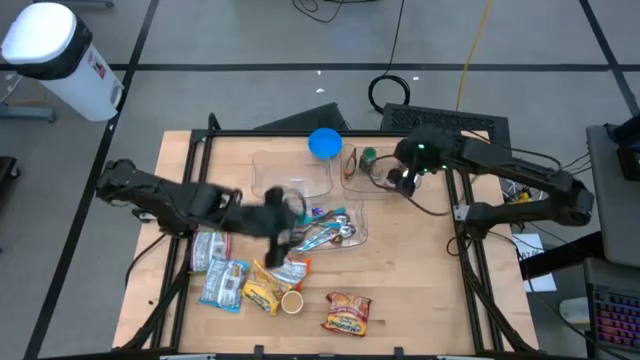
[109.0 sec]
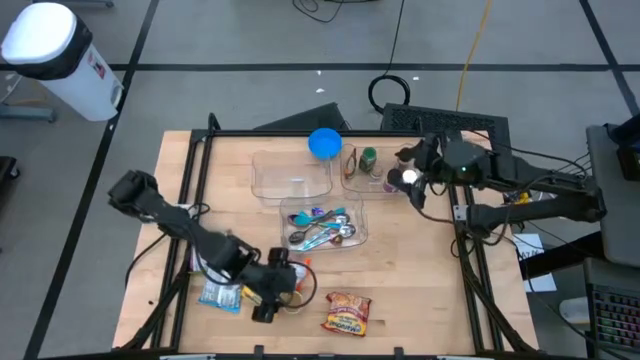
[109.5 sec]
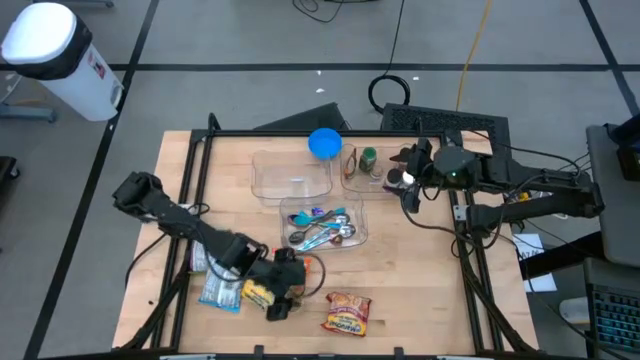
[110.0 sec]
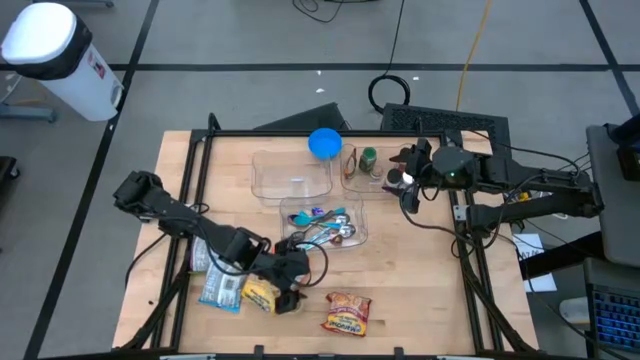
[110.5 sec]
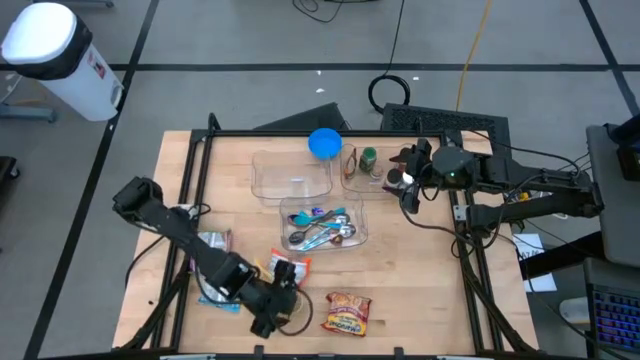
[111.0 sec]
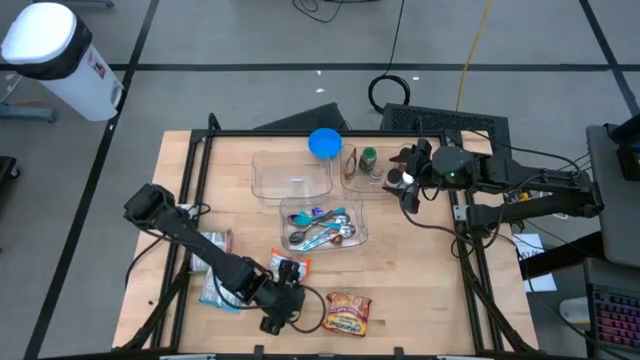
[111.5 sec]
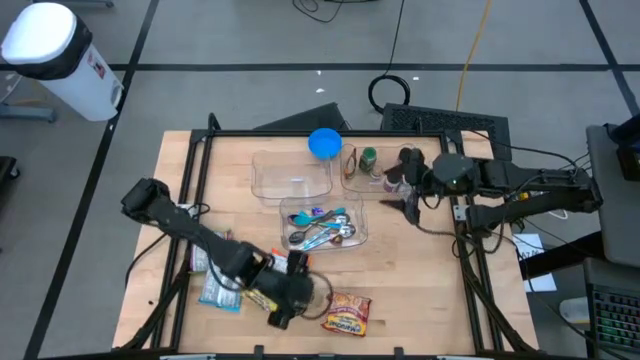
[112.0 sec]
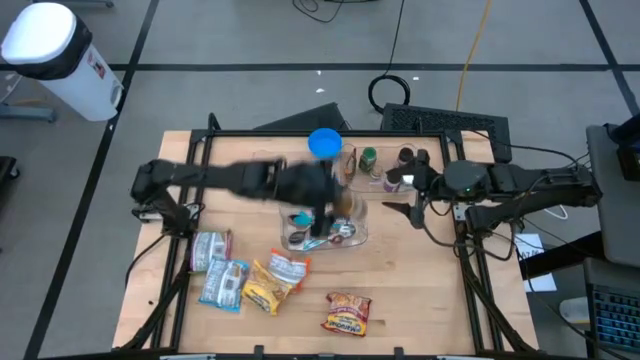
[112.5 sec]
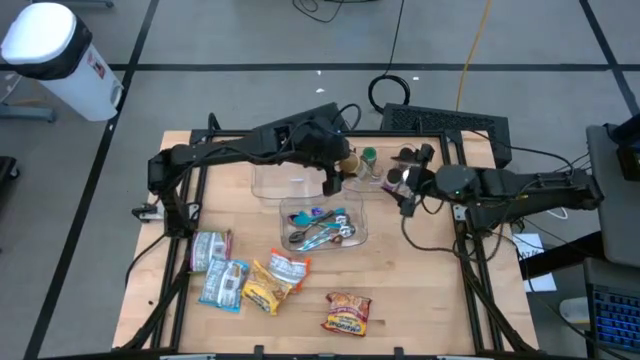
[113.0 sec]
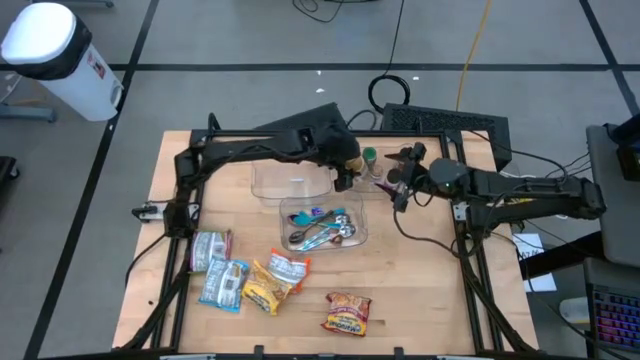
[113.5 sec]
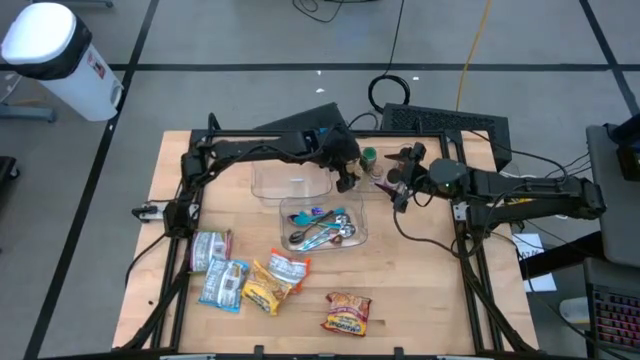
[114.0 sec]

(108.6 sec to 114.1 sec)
Task: Pick & Place Food Item
Put the gold seasoning bottle into the top right transparent bin

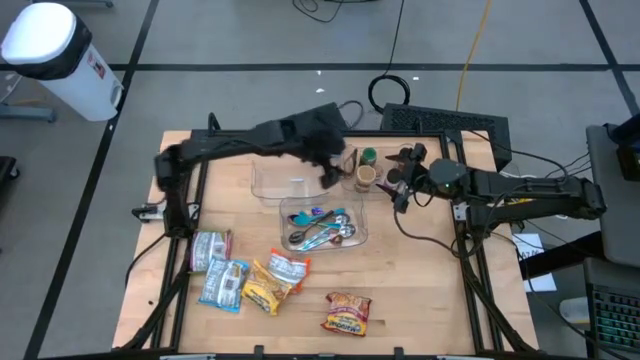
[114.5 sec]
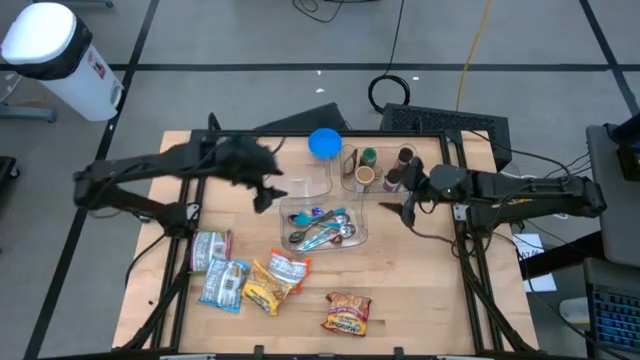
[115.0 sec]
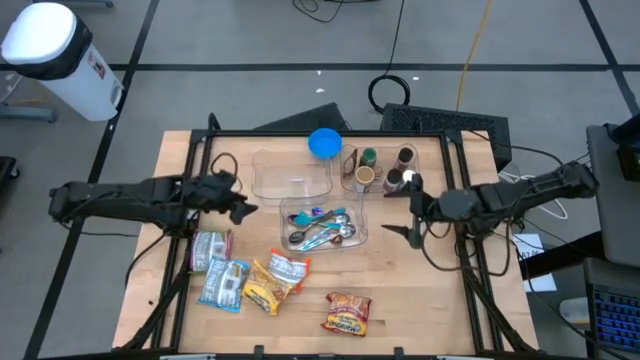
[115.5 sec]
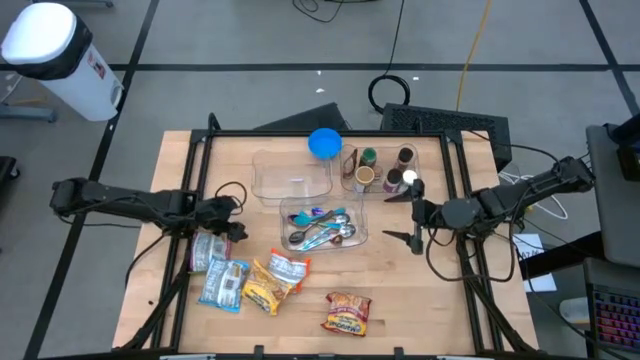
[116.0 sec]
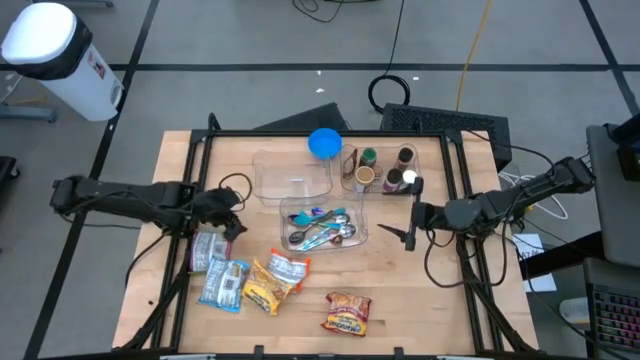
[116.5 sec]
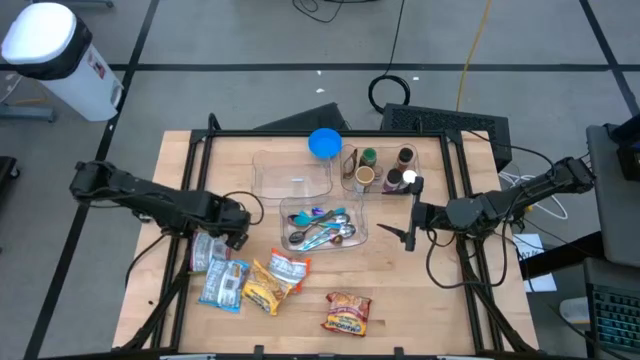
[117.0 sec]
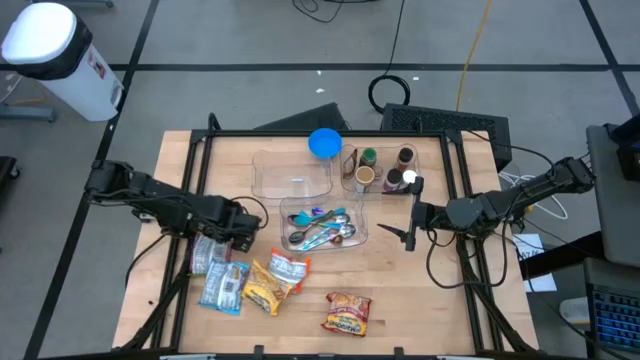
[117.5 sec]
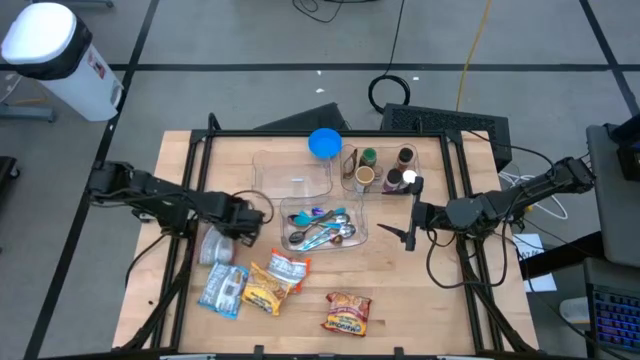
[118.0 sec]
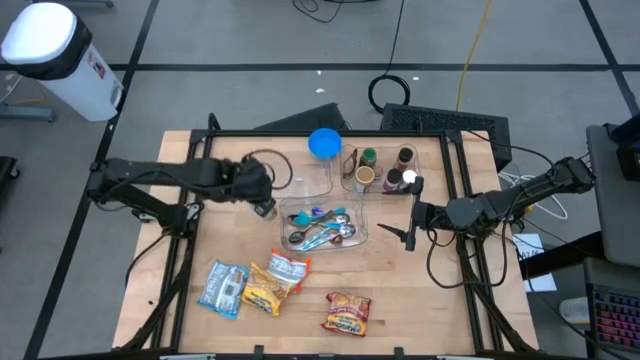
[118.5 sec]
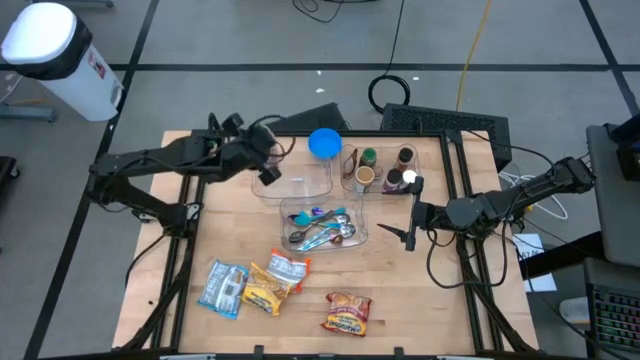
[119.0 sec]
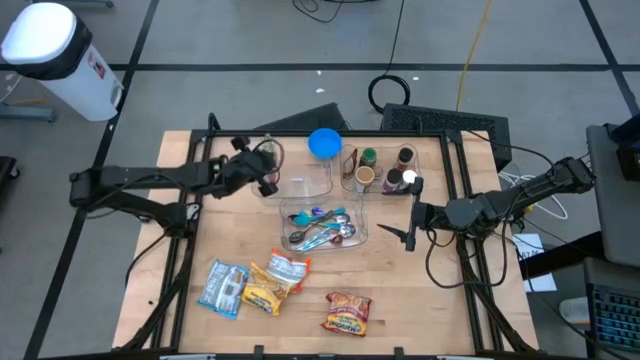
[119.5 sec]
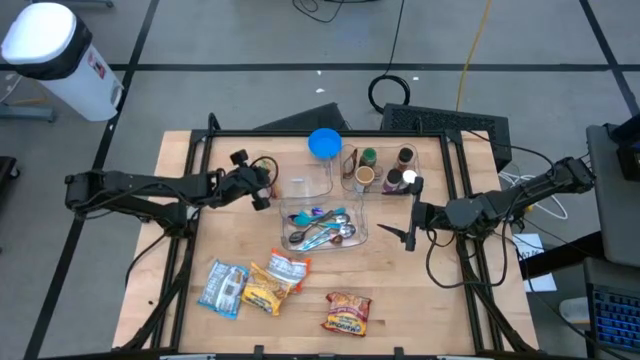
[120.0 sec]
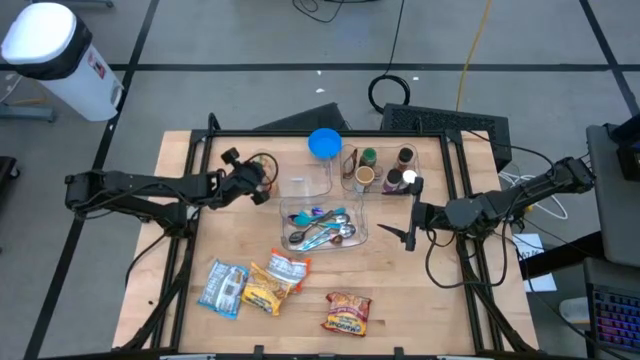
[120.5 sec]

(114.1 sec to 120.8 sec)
Put the green noodle bag into the top left transparent bin

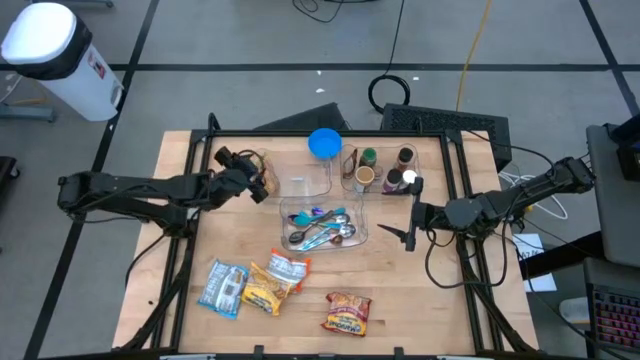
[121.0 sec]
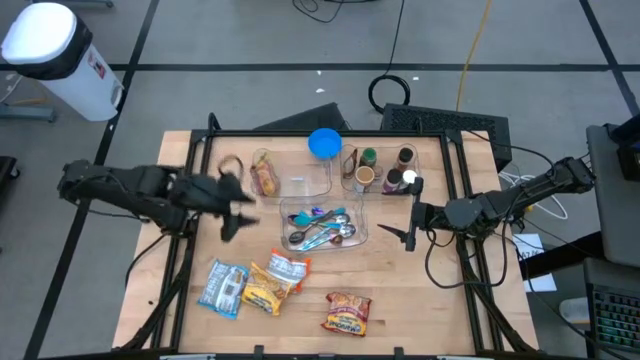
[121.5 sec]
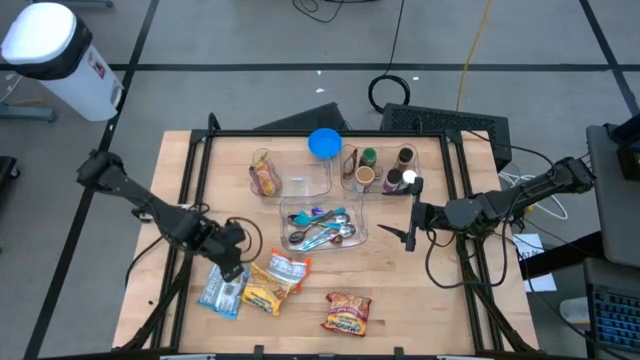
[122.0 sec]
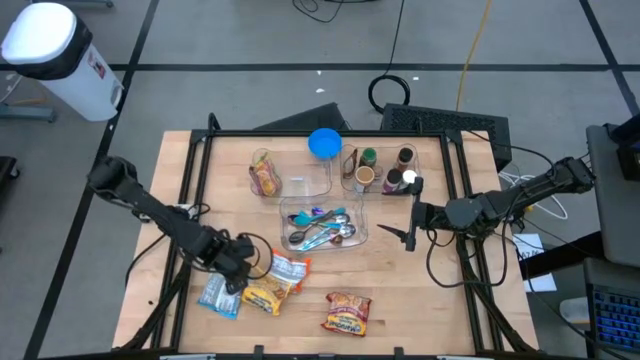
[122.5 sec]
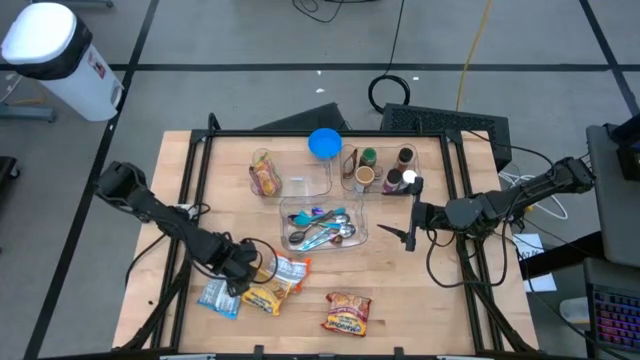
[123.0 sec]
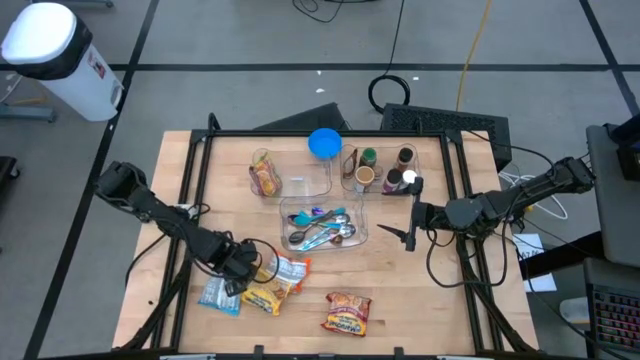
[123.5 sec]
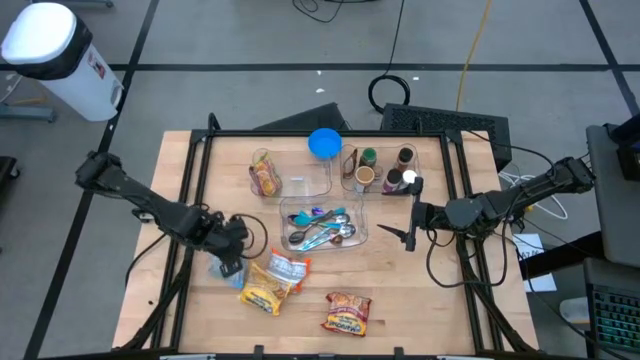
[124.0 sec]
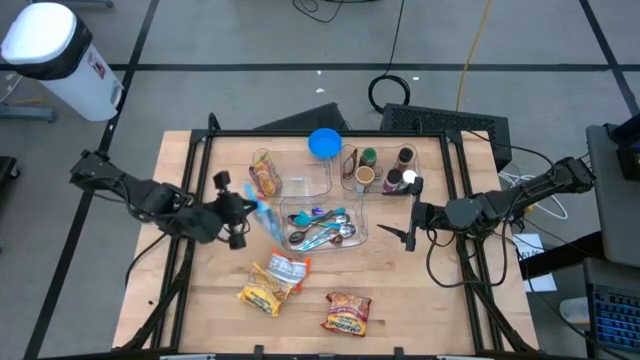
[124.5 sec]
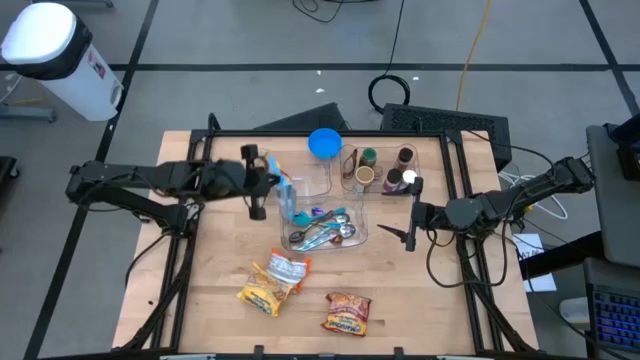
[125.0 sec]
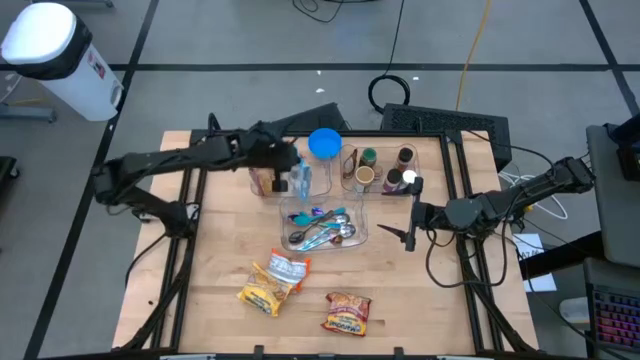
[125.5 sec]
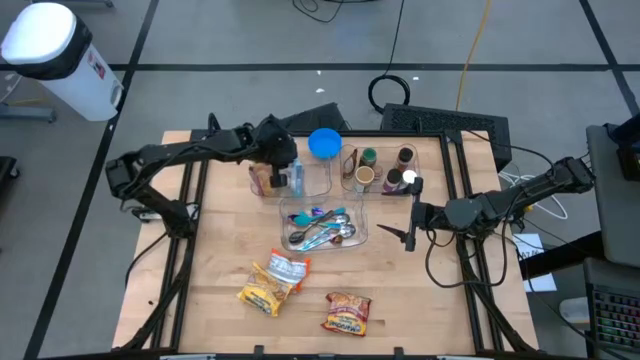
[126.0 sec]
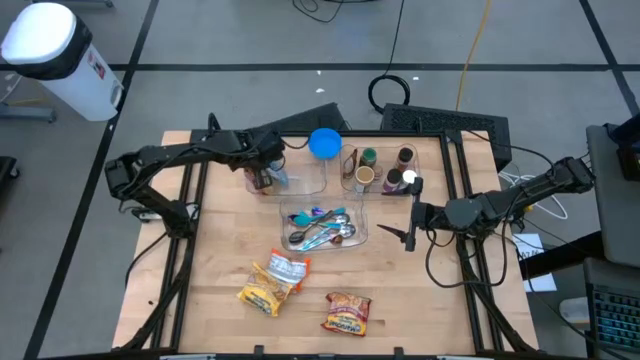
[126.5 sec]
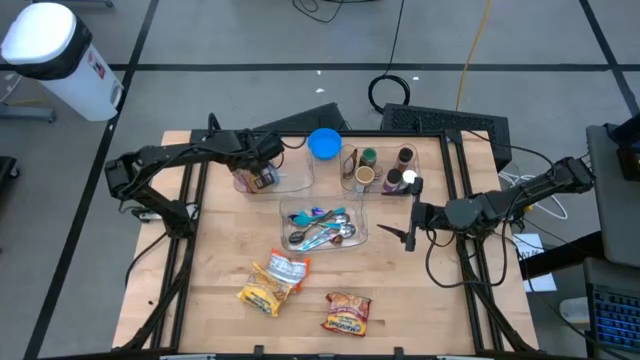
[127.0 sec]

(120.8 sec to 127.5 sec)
Put the blue noodle bag into the top left transparent bin

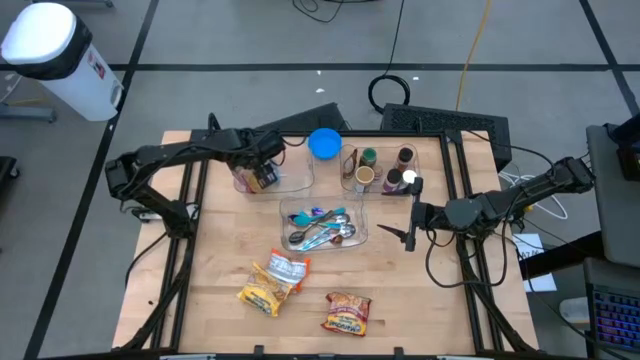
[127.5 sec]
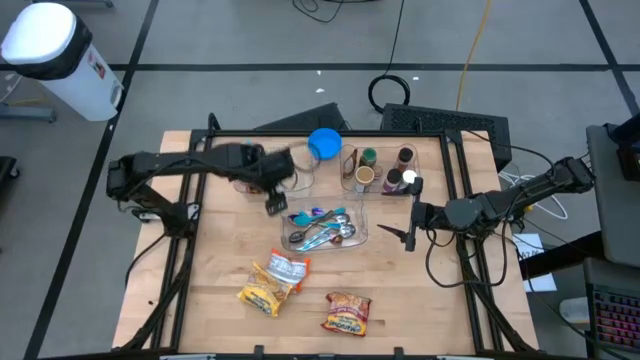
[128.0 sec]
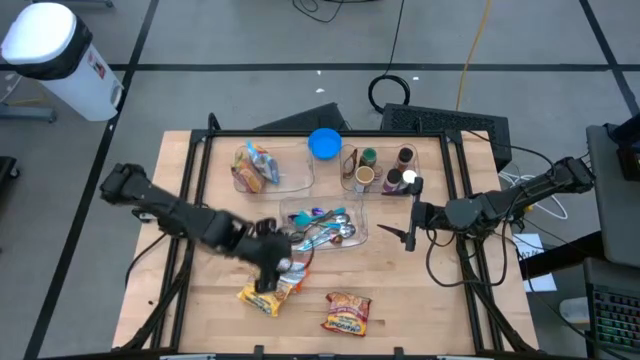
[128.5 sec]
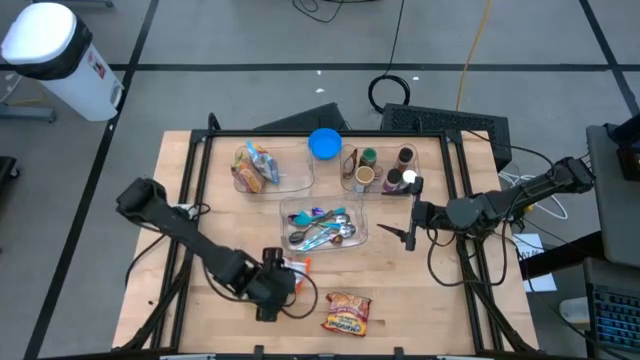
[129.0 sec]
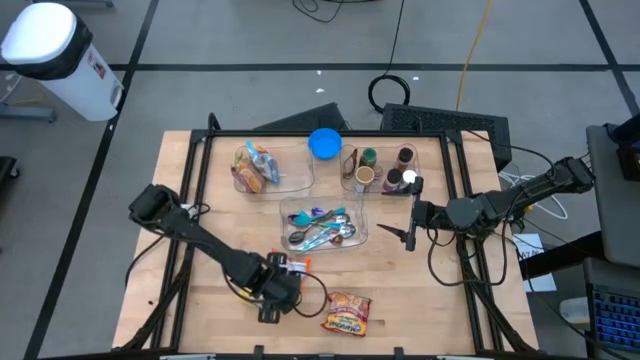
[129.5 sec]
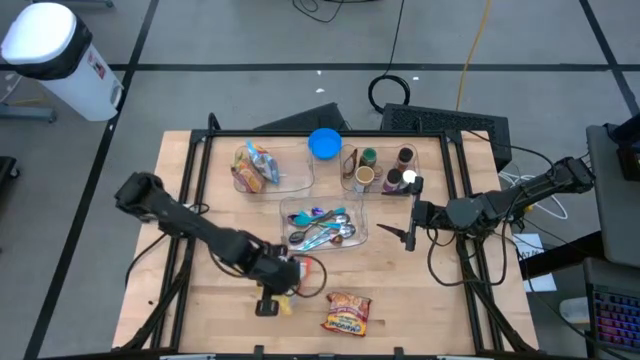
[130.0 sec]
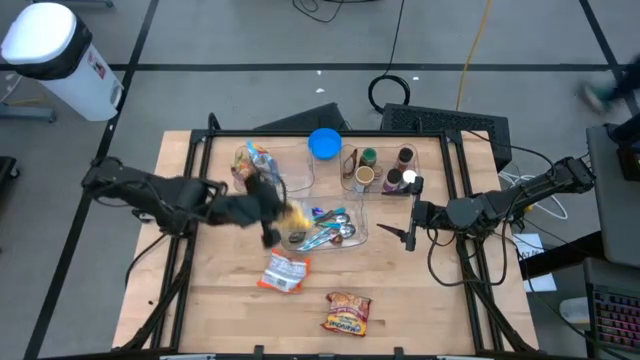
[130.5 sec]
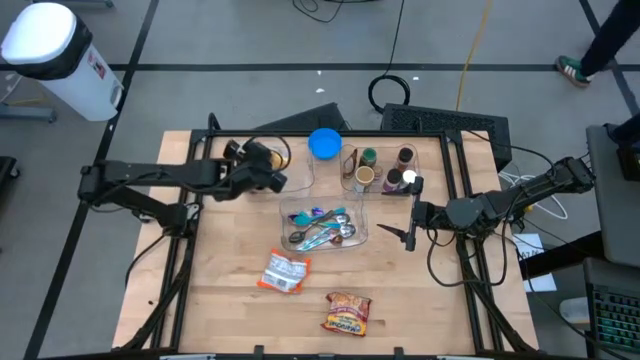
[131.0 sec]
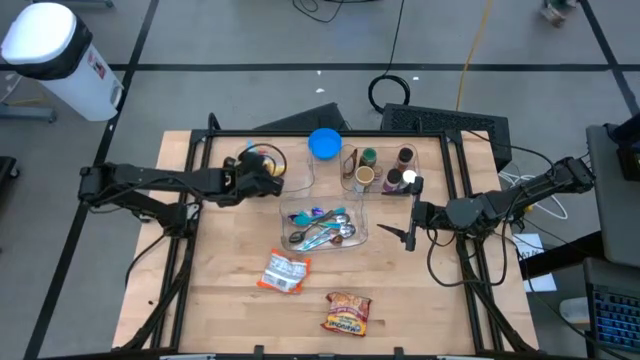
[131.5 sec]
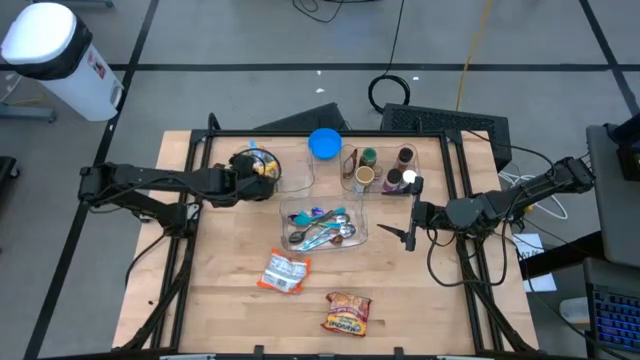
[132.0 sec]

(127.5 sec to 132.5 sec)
Put the yellow noodle bag into the top left transparent bin
